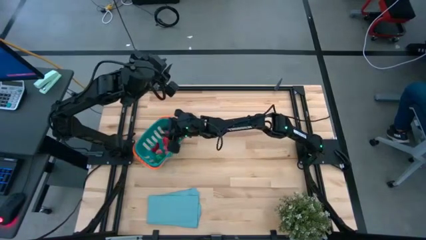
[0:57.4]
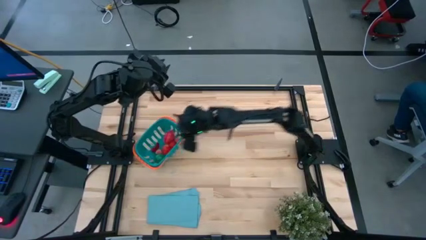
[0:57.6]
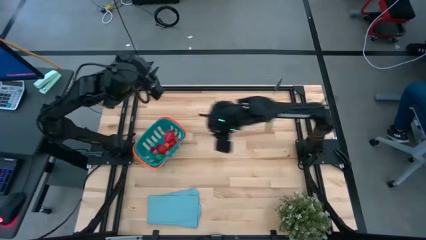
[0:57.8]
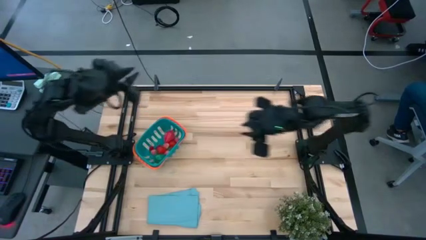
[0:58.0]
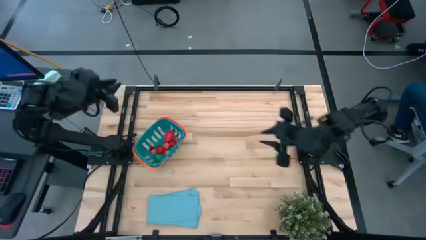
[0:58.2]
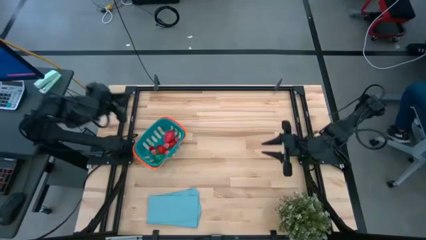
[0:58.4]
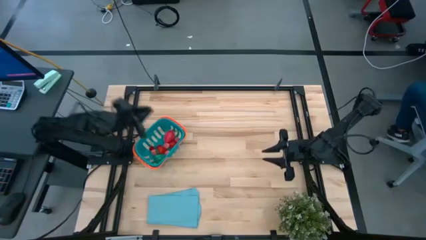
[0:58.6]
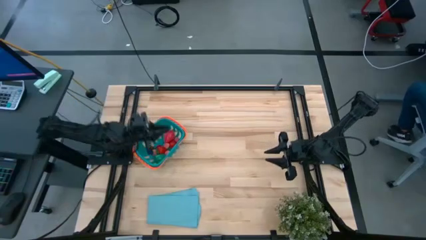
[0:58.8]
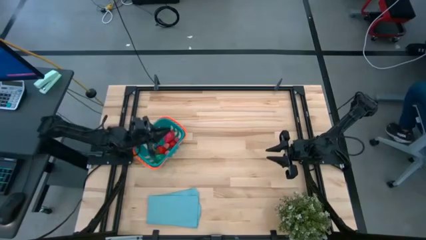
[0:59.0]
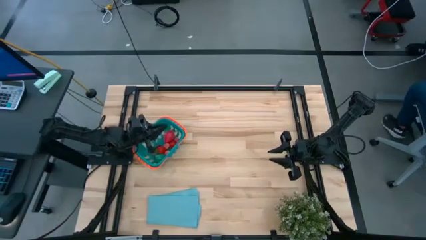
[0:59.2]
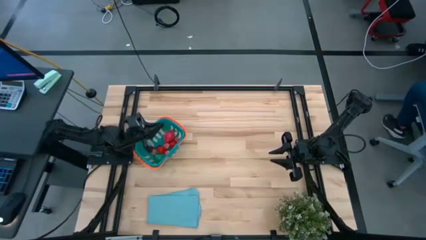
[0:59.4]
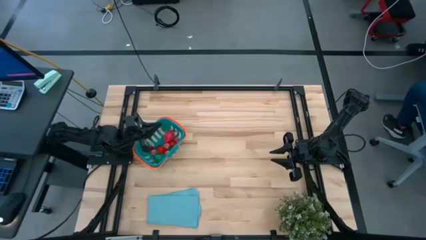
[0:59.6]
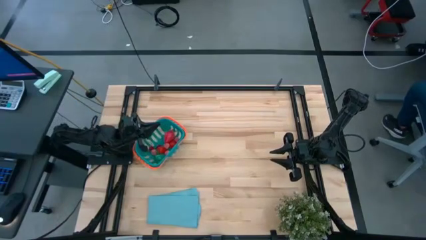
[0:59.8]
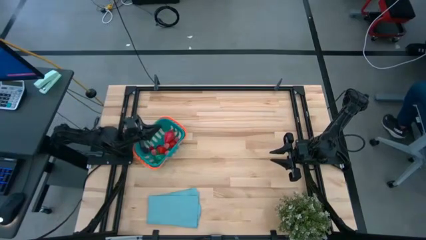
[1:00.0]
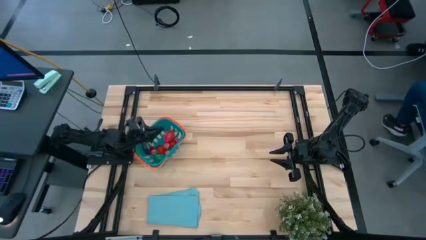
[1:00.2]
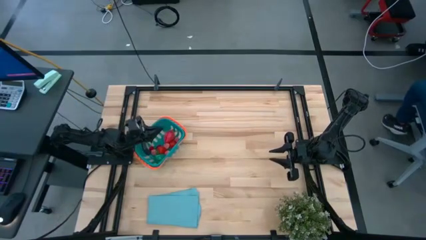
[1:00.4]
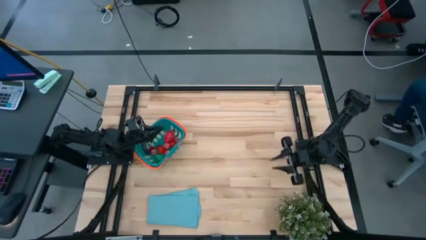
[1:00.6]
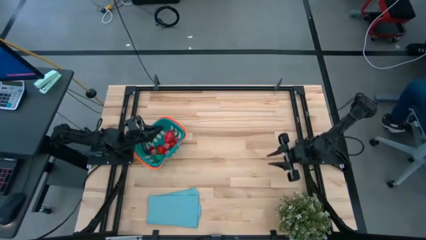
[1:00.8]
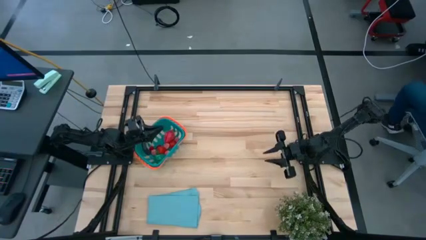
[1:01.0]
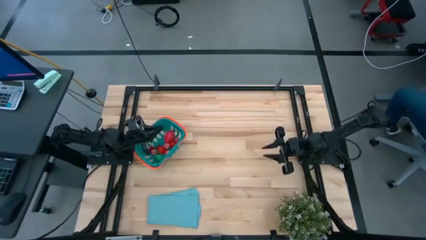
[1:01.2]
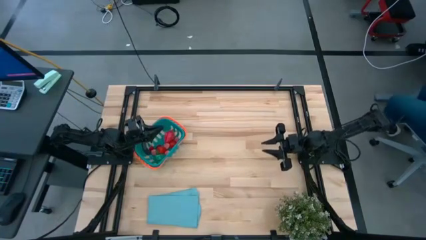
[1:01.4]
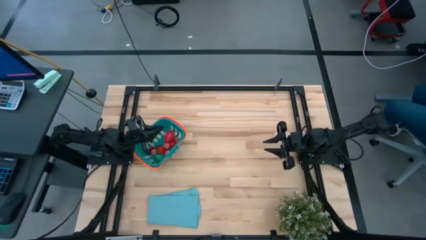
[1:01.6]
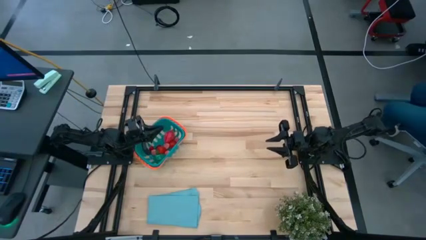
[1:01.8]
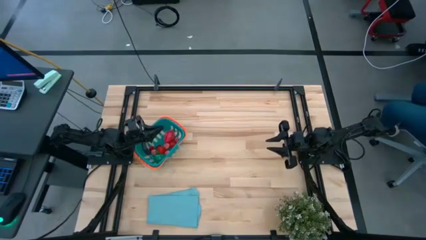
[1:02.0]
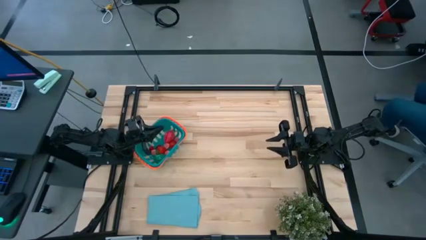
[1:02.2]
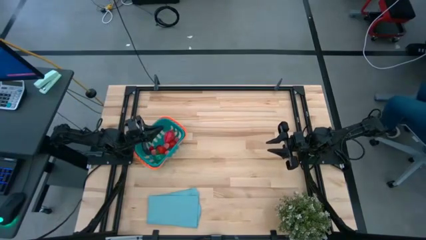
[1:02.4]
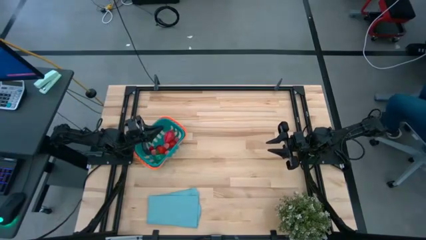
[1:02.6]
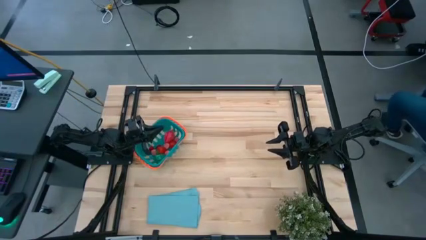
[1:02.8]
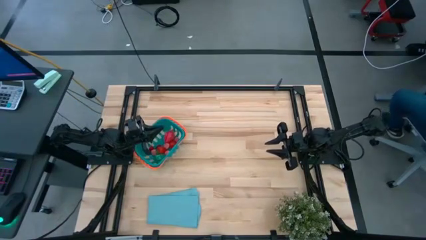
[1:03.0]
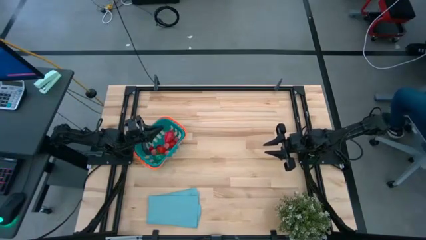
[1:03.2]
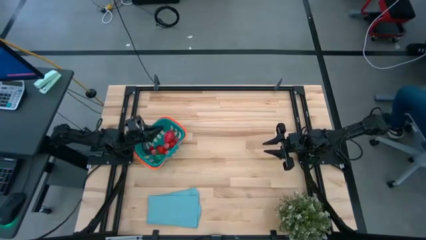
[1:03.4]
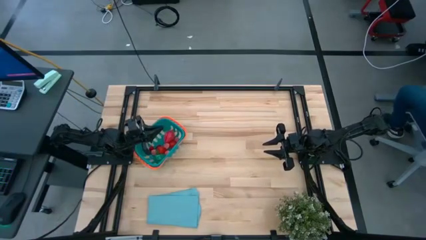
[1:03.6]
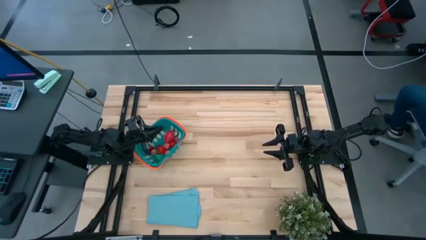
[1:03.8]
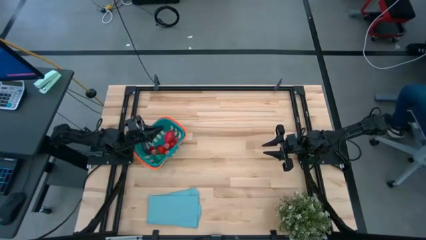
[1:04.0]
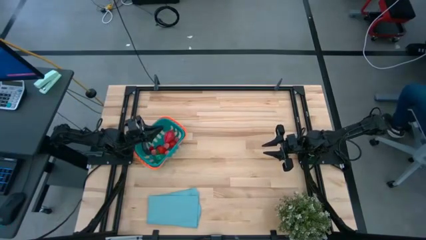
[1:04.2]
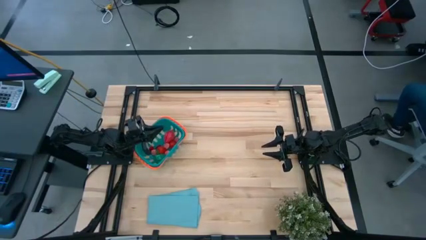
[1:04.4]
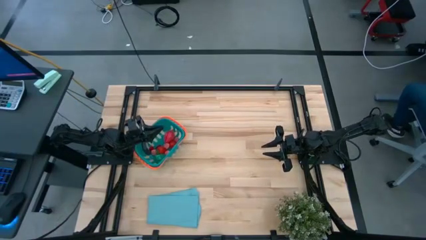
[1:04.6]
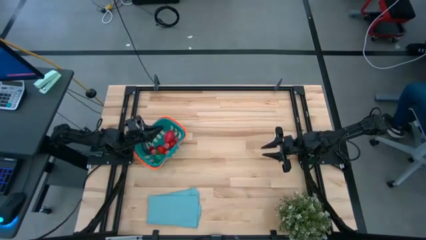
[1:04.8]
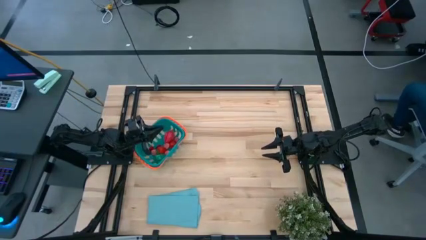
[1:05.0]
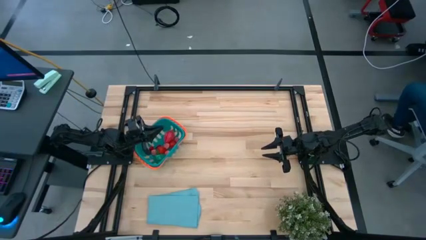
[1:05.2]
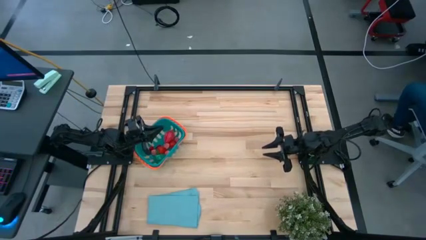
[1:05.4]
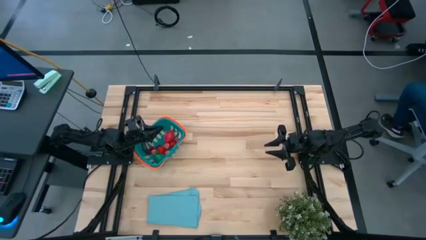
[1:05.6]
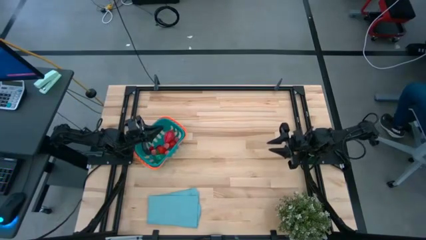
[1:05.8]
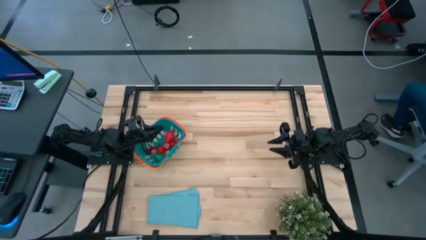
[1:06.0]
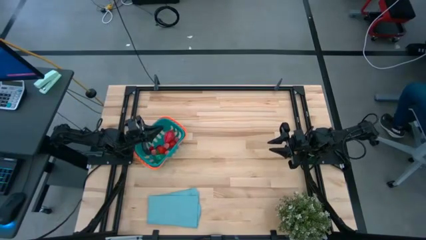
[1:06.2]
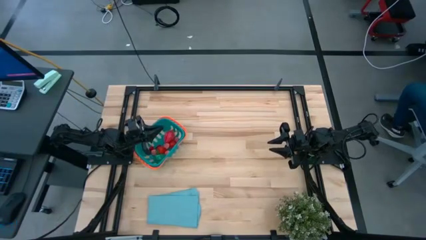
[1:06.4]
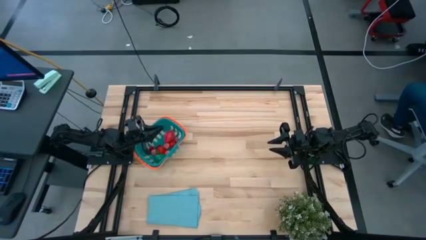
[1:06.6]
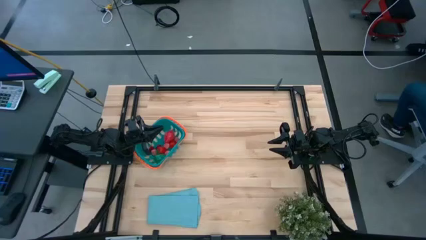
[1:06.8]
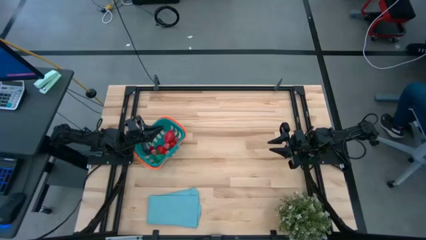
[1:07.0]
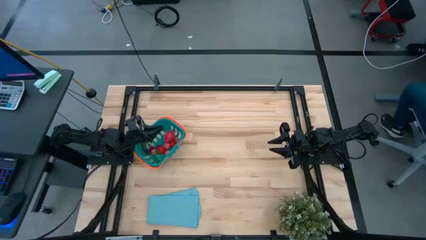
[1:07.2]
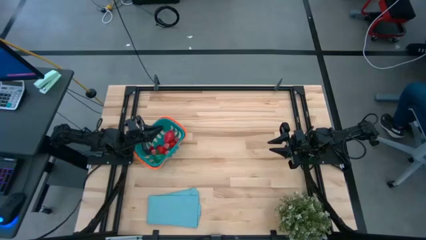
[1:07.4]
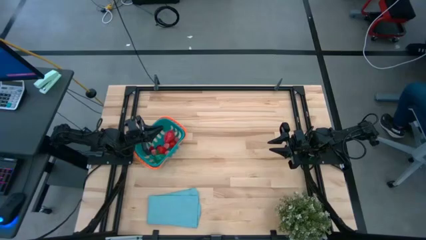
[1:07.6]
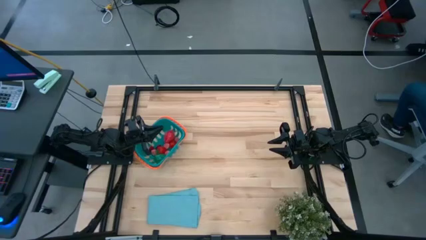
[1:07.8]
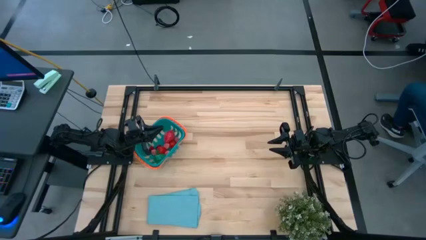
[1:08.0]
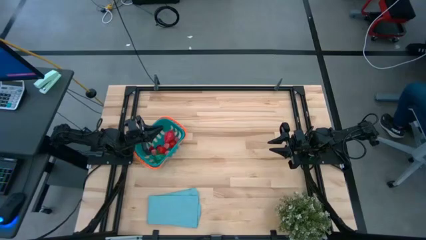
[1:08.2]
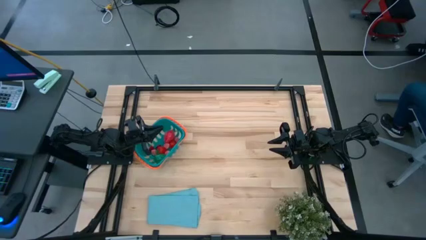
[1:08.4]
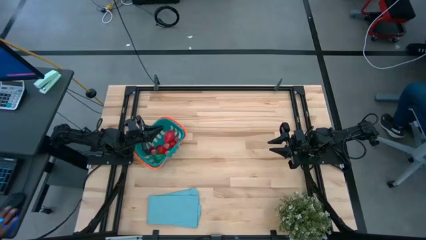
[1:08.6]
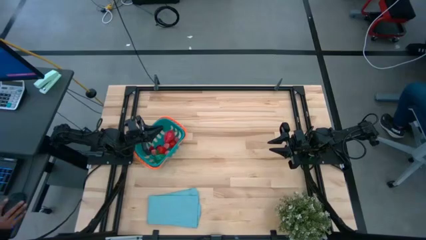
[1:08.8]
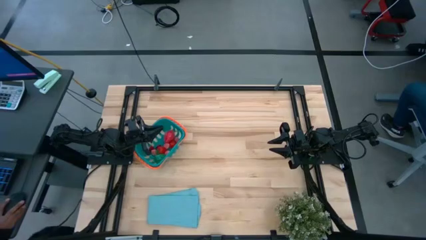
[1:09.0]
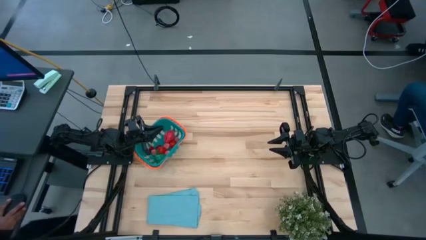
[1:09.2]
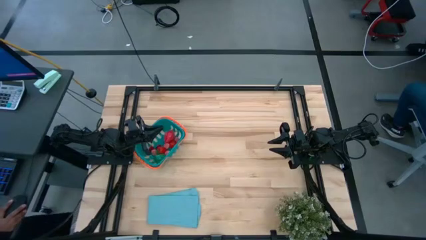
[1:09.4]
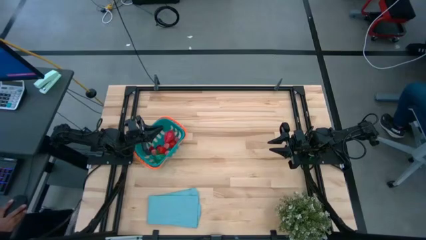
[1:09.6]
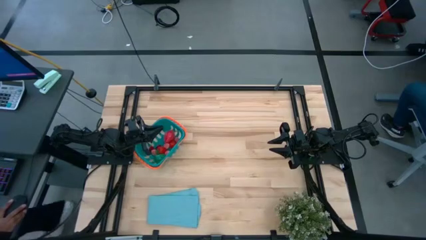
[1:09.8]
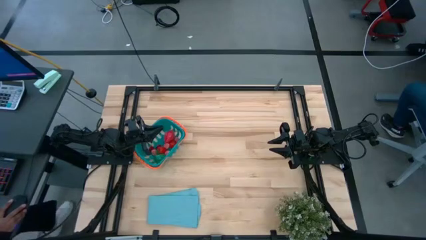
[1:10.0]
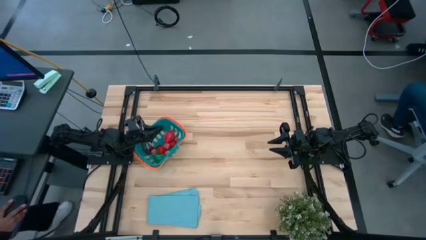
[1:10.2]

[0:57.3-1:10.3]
Task: Pick and placing Produce into tupperware
Return to Home Position

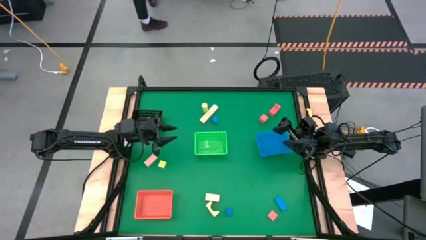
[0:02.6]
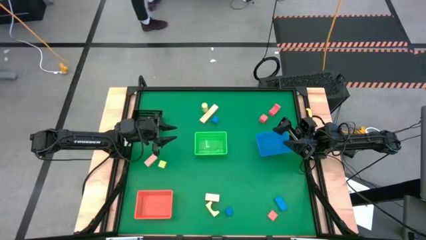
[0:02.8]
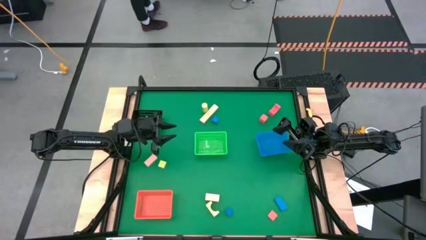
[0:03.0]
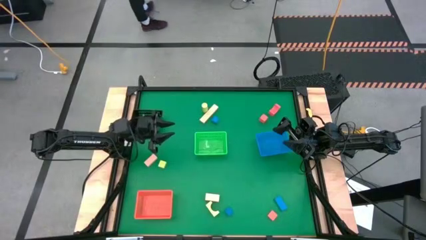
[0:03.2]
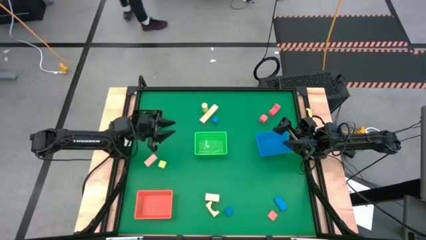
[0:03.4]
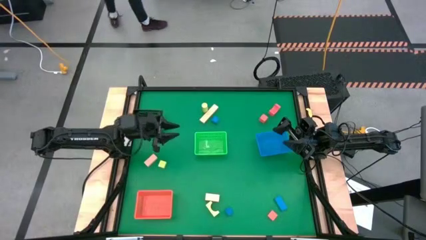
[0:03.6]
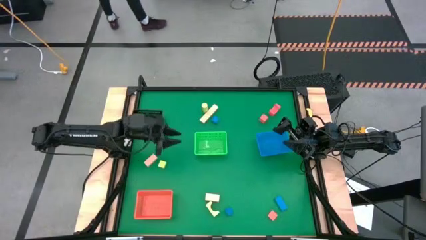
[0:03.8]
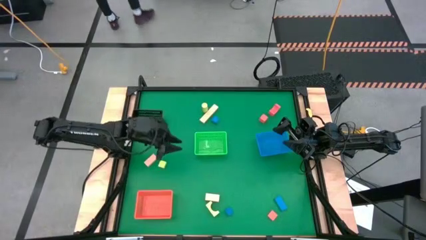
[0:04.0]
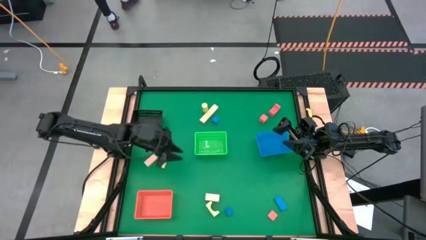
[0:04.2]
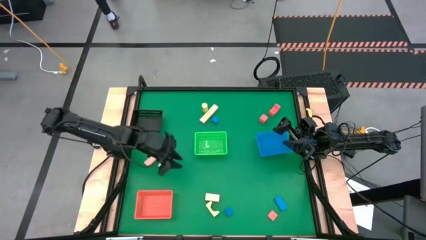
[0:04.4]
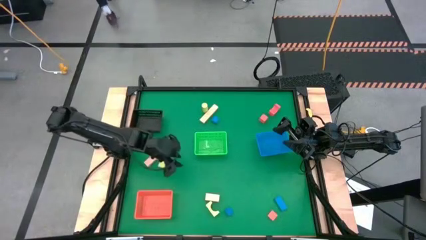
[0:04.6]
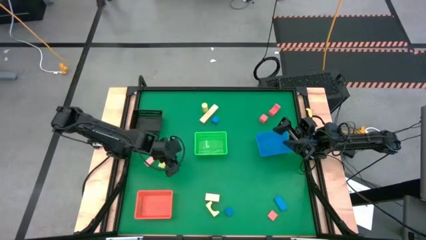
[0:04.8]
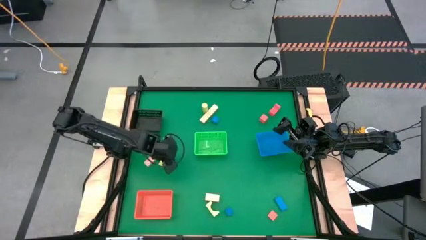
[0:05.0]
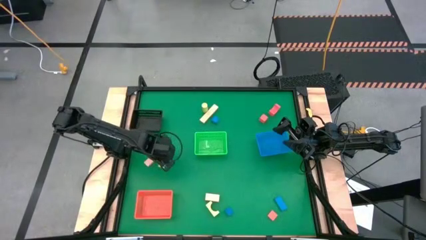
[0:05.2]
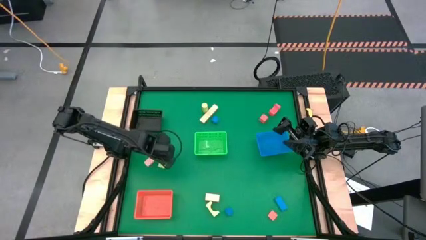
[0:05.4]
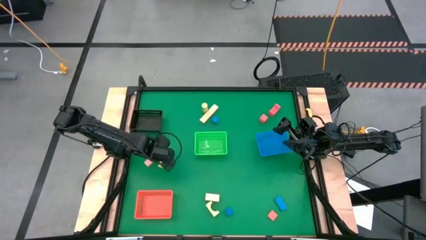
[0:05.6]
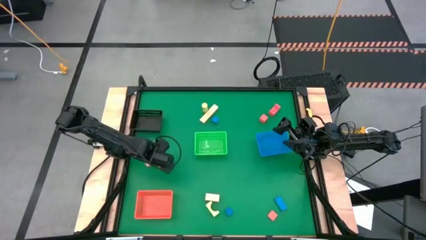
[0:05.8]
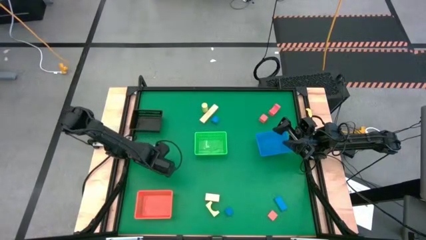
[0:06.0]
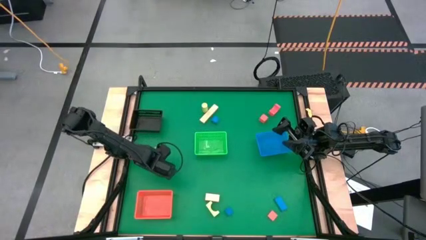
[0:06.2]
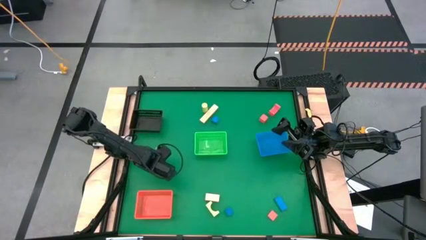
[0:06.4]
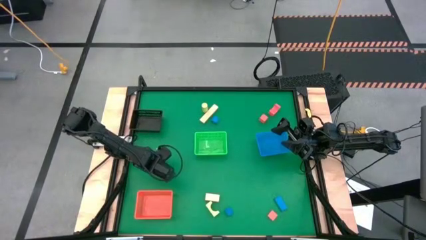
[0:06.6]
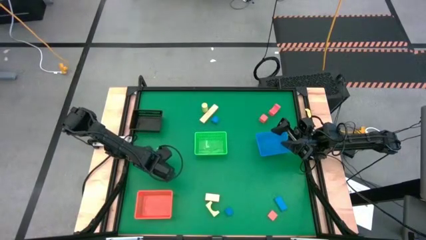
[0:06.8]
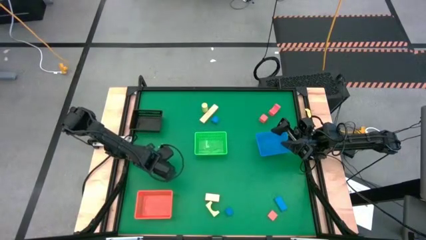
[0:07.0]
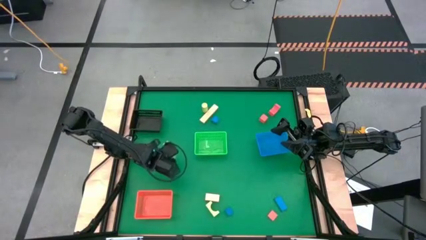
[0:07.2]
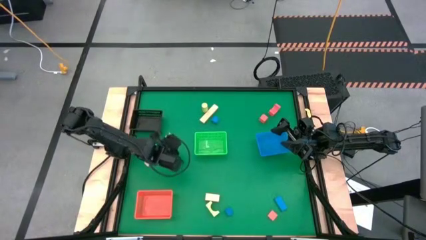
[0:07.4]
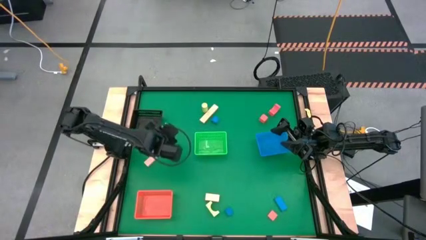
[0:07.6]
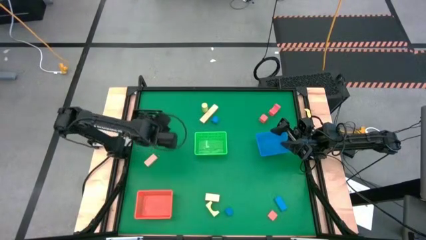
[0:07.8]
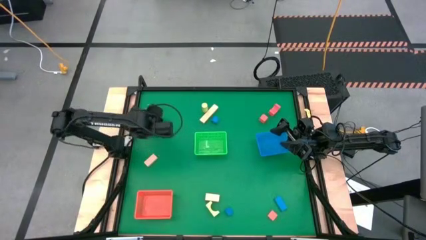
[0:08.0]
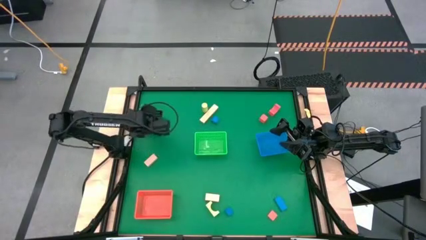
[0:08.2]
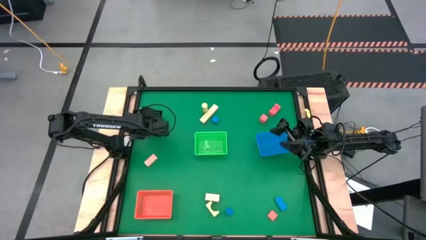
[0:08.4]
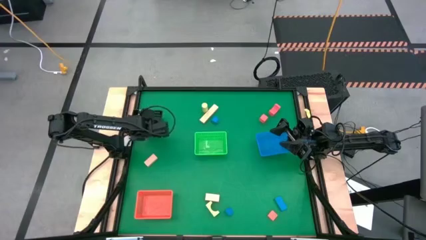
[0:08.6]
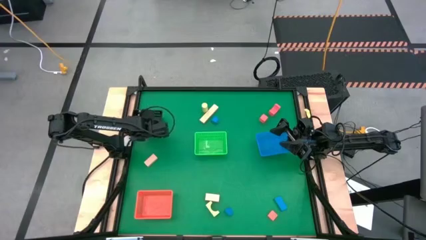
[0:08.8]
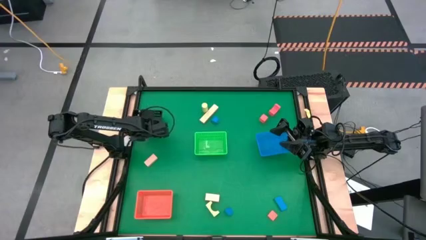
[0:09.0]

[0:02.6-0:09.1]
Task: Sort & place blocks by color
Put the middle yellow green block into the black bin
